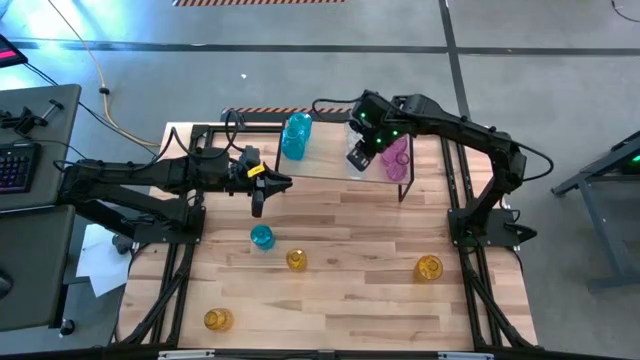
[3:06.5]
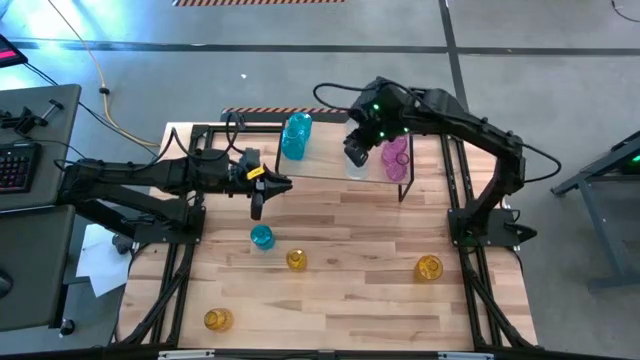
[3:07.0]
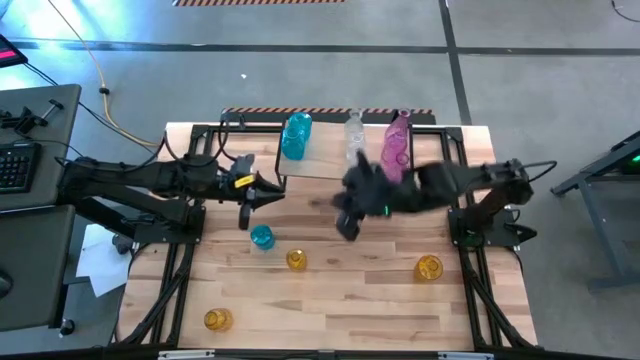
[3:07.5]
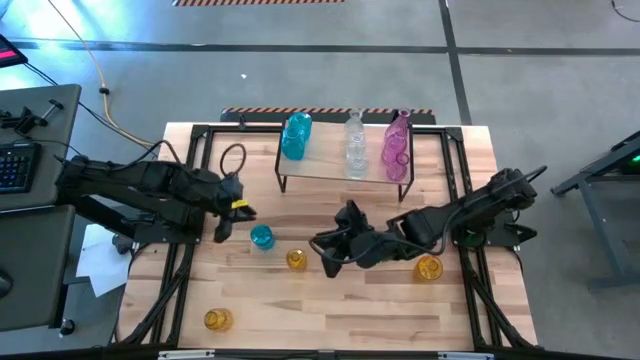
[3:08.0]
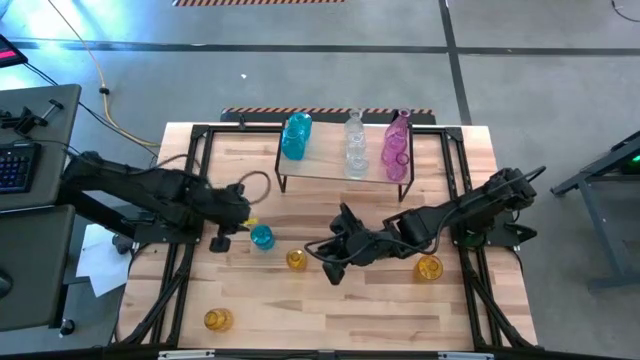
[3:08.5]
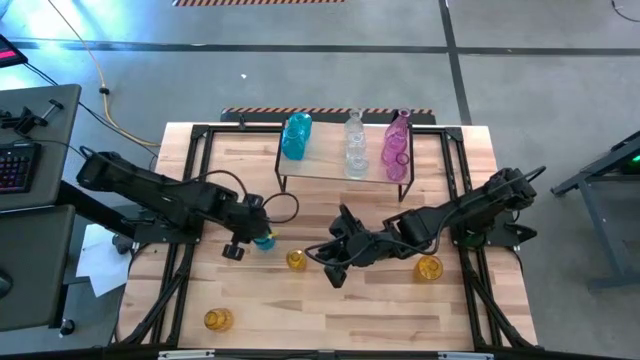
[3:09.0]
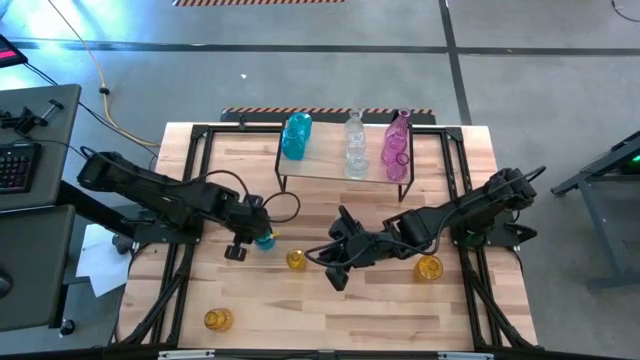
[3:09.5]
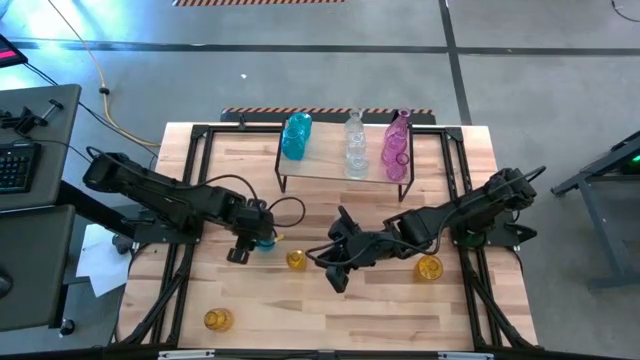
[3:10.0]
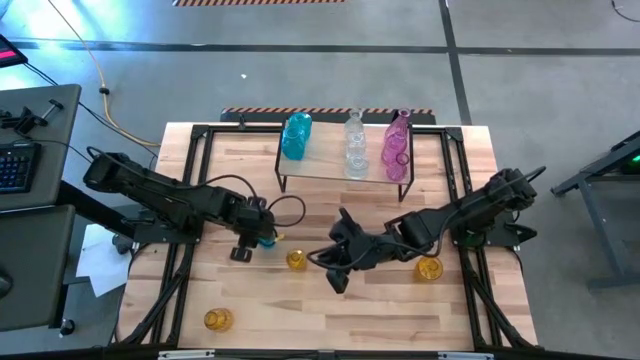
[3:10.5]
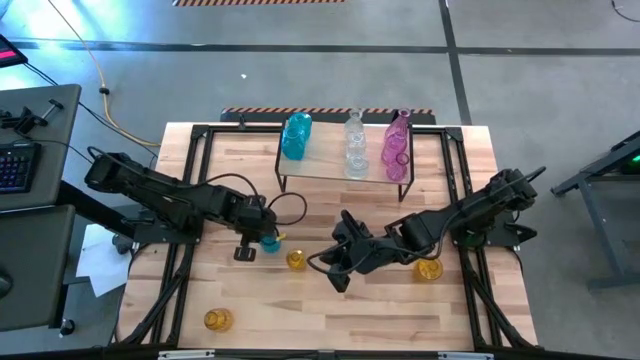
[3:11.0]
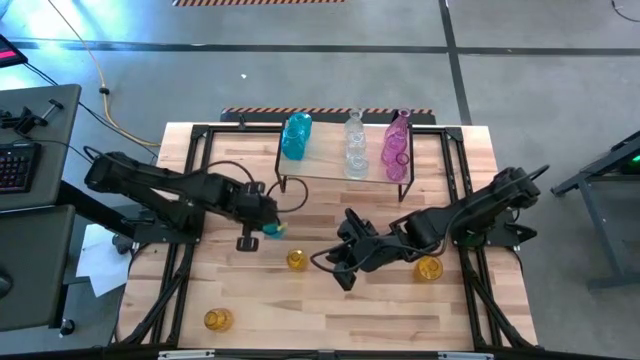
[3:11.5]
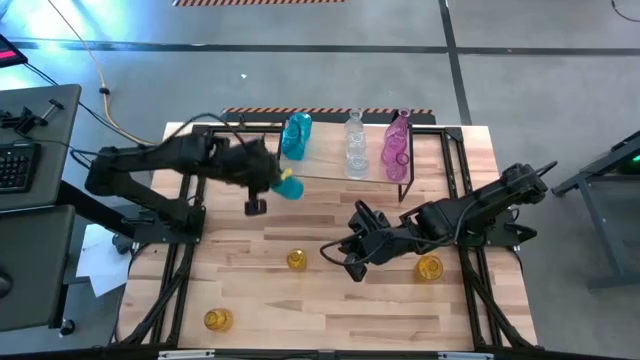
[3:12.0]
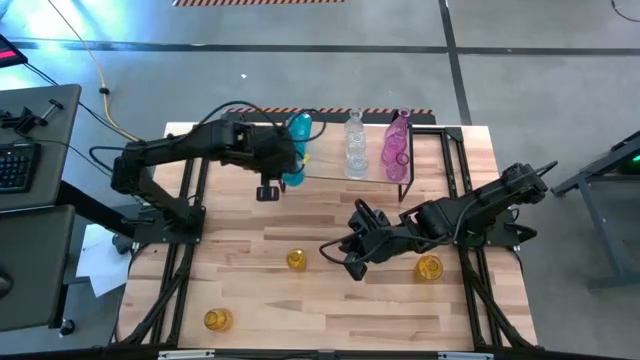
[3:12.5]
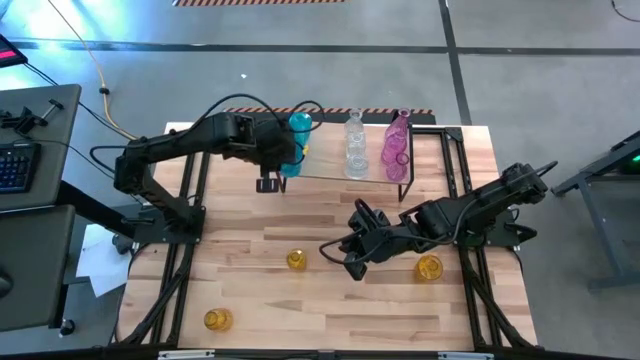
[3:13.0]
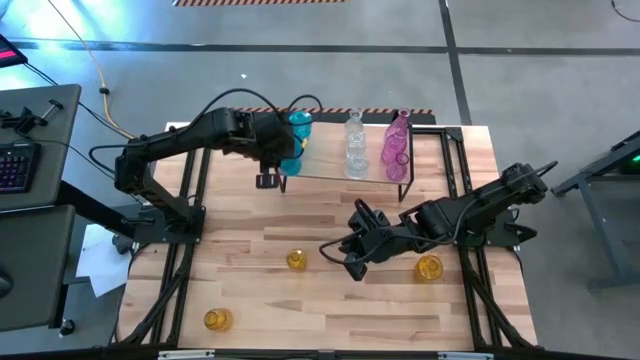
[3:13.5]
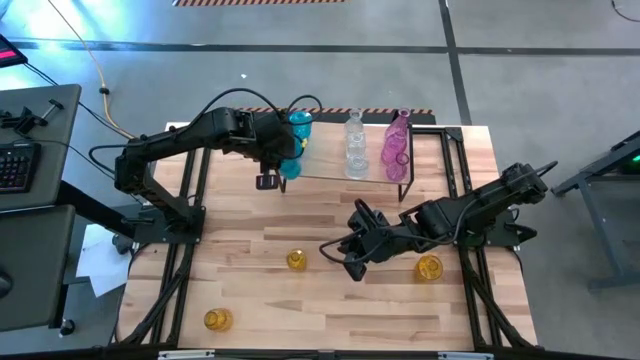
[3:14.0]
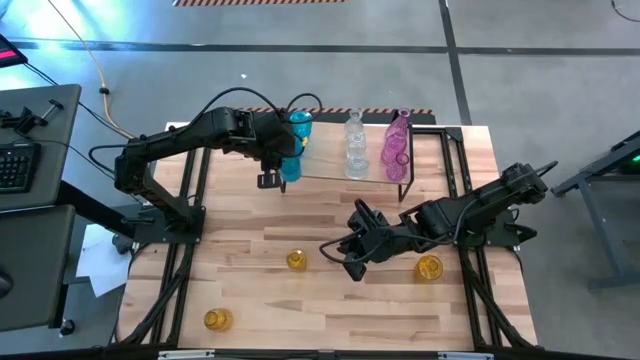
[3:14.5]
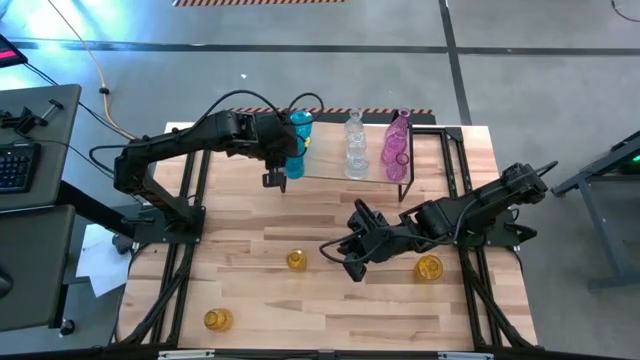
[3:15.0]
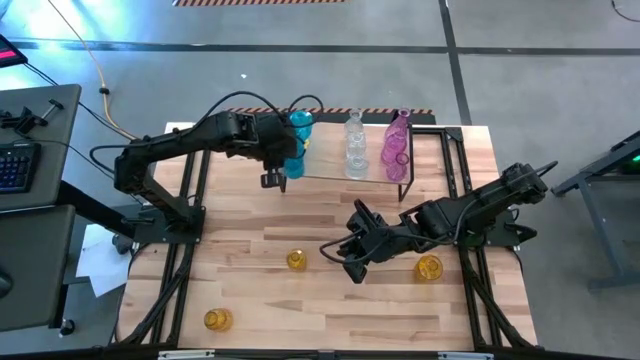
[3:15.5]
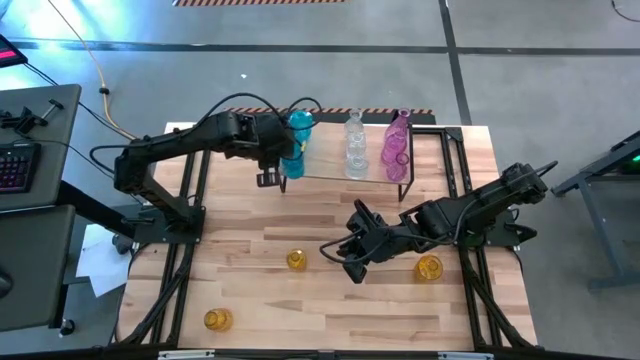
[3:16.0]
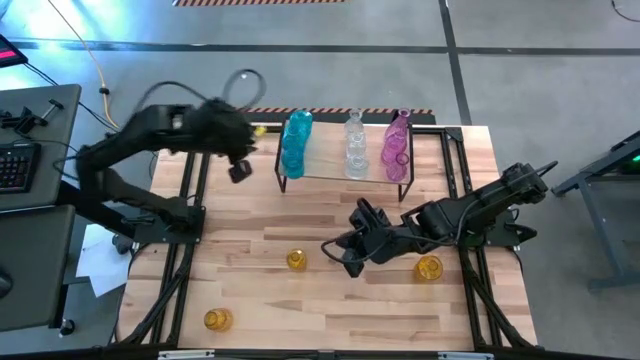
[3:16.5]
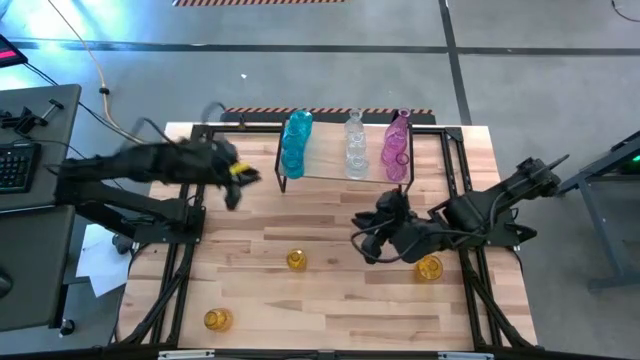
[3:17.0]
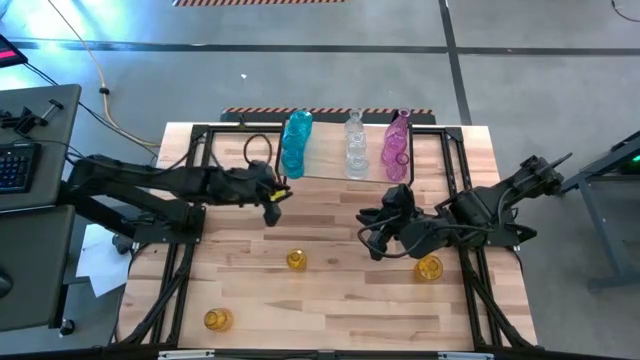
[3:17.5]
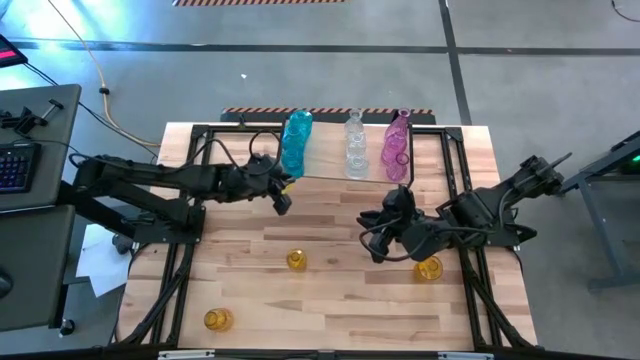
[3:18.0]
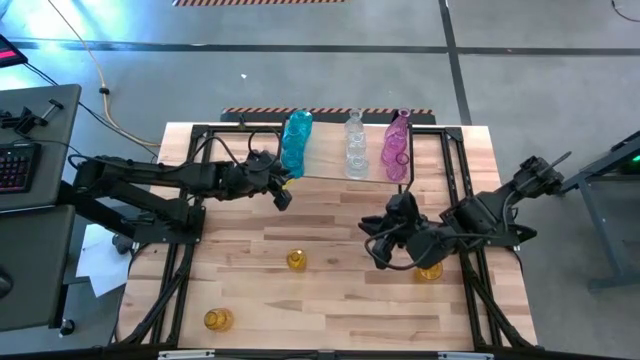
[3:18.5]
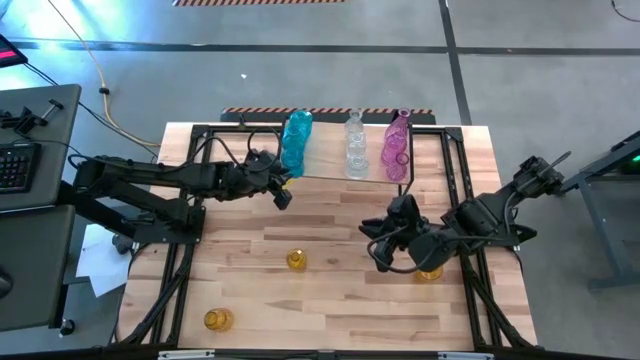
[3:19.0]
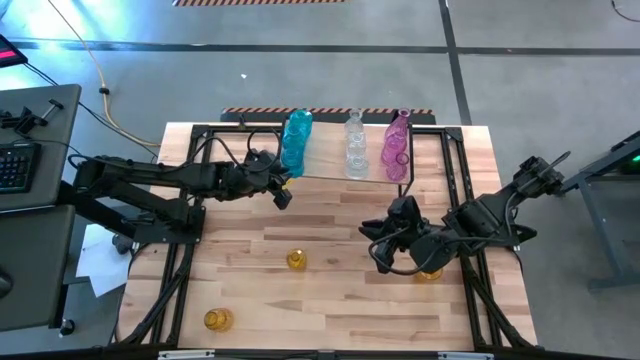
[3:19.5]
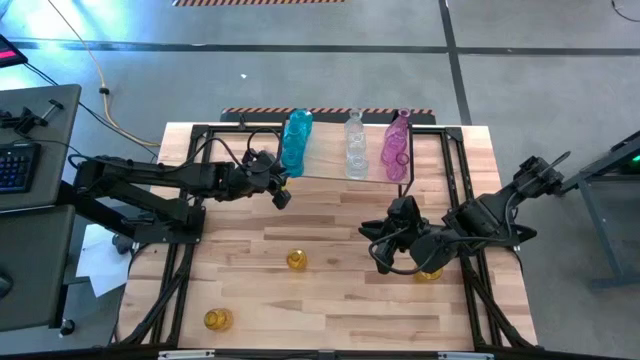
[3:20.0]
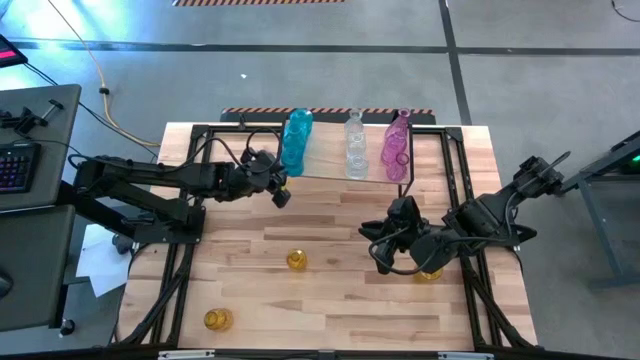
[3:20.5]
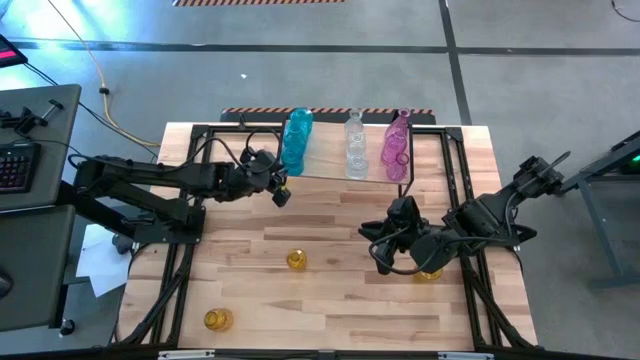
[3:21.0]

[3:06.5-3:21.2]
Task: sort vases onto shelf
Put the blue vase on the shelf aligned with the other blue vases

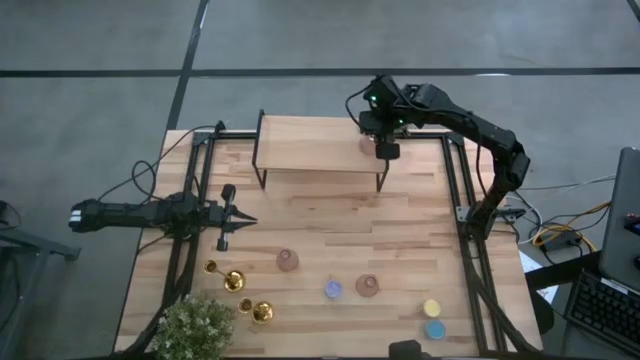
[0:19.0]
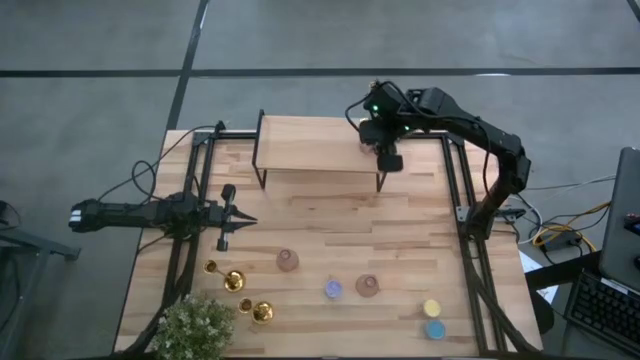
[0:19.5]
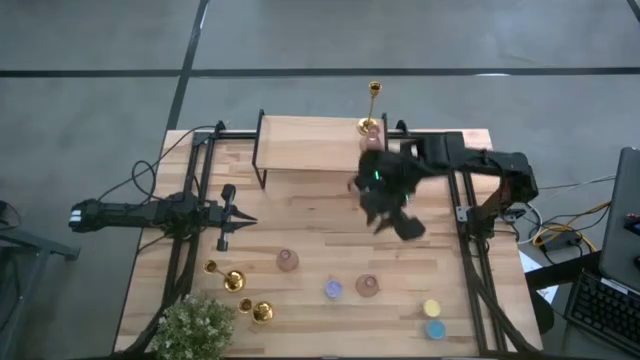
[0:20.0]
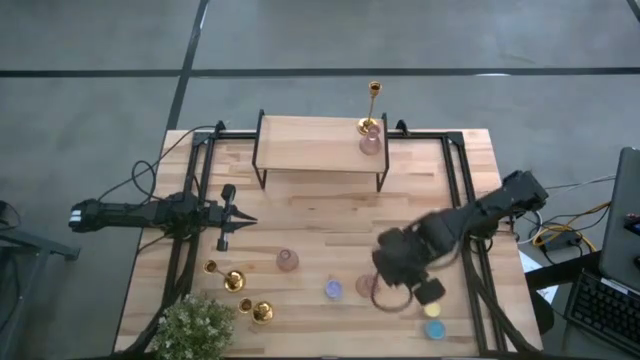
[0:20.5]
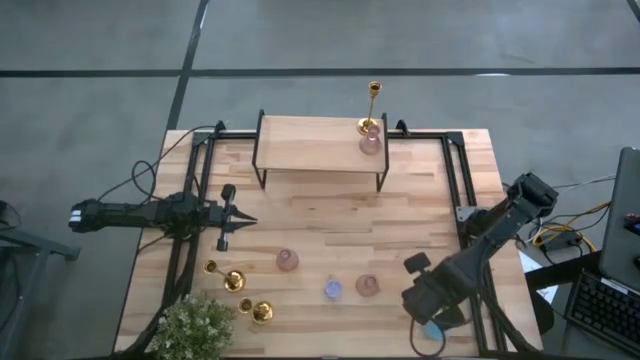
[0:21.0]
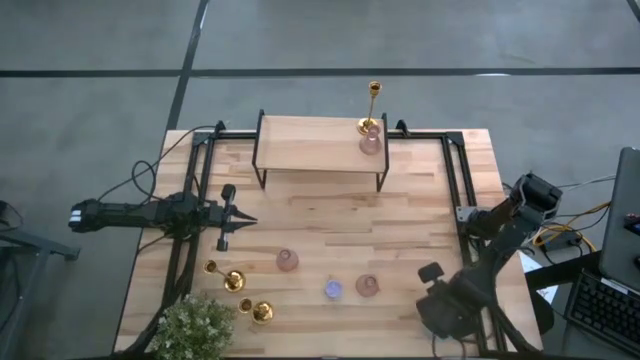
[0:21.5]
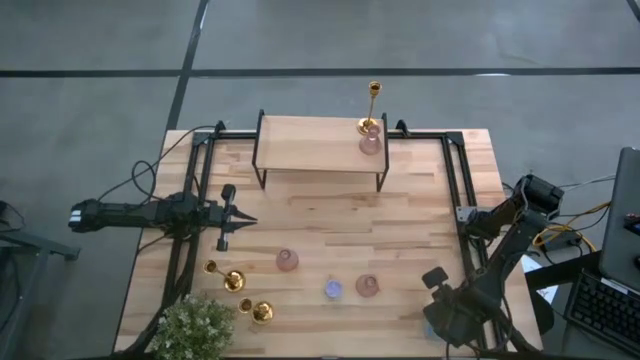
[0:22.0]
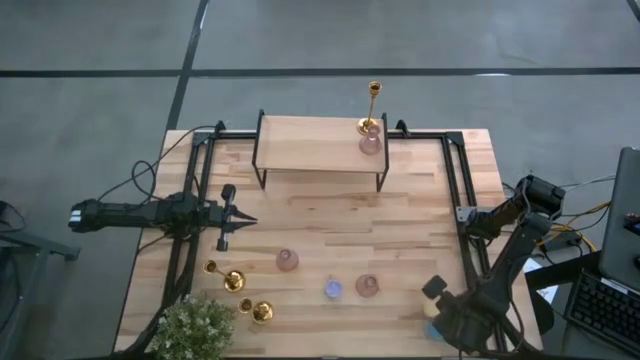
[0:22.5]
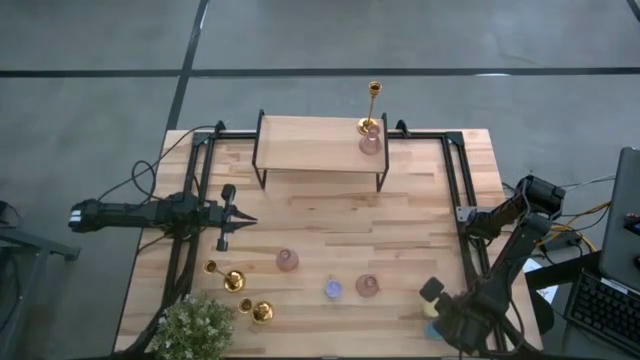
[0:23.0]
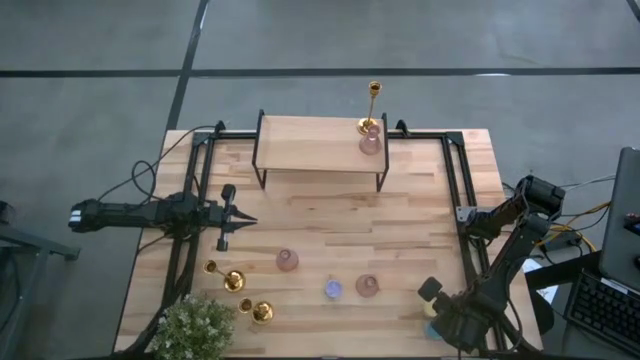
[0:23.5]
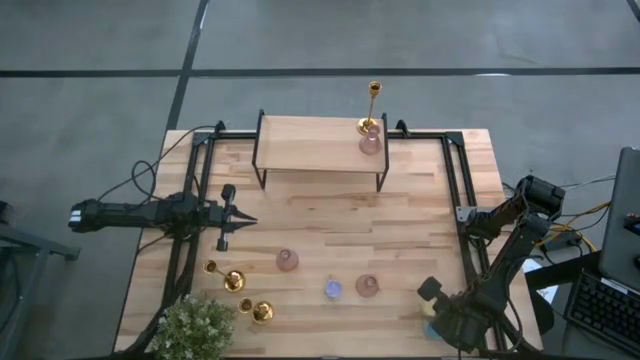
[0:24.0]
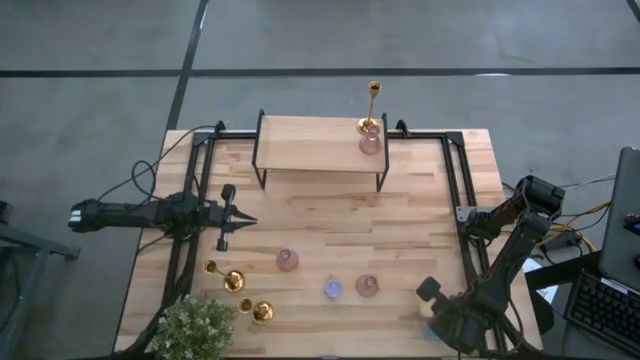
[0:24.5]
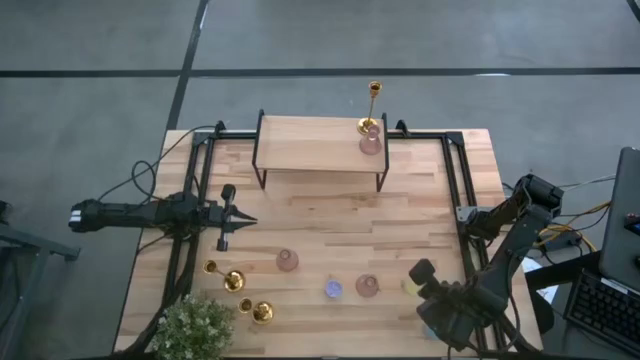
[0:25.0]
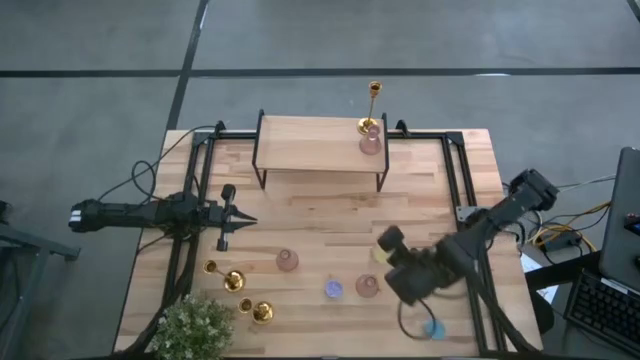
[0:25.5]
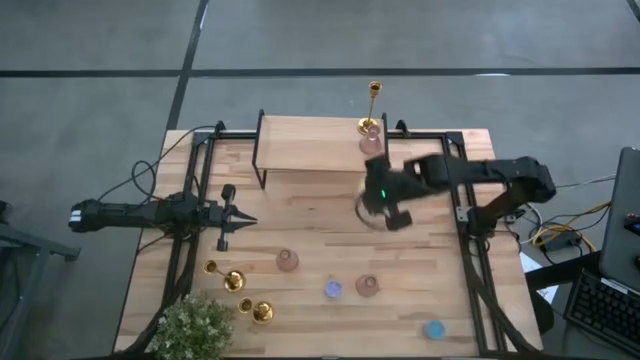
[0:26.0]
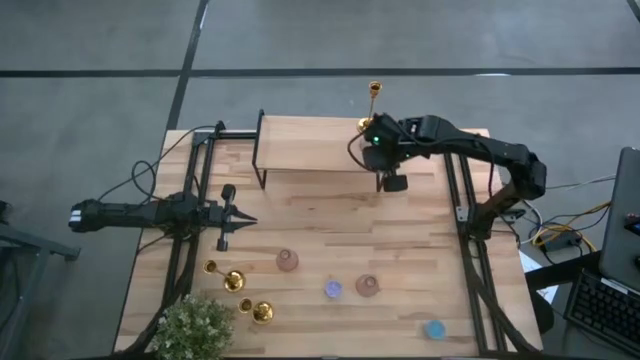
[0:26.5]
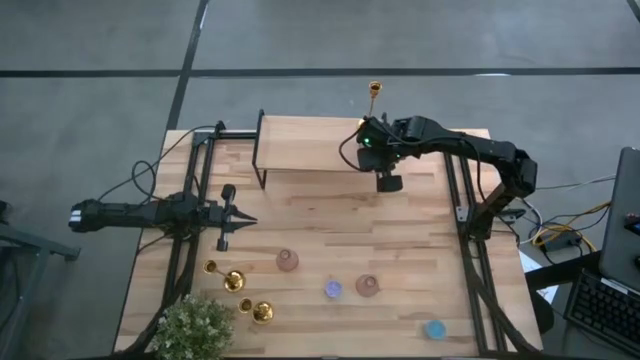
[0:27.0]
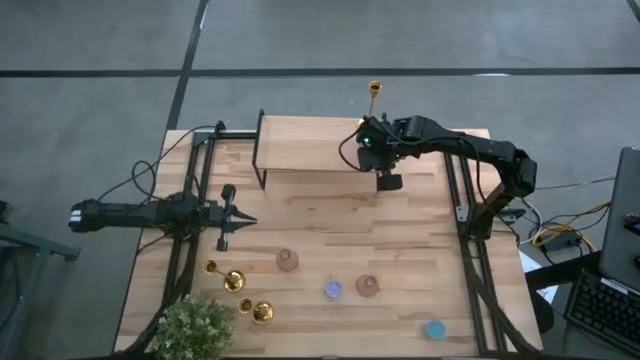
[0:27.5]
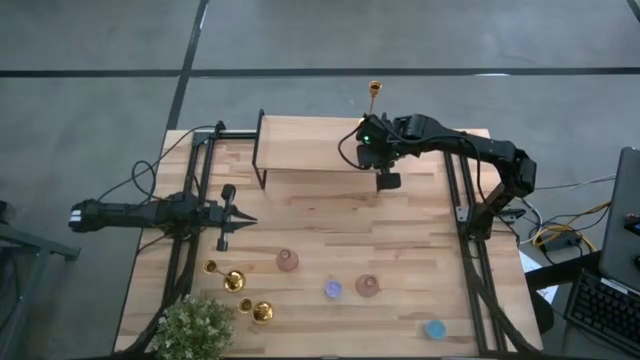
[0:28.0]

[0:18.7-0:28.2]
Task: Pick & Place candle stick holders
Put the yellow scented candle on the shelf
